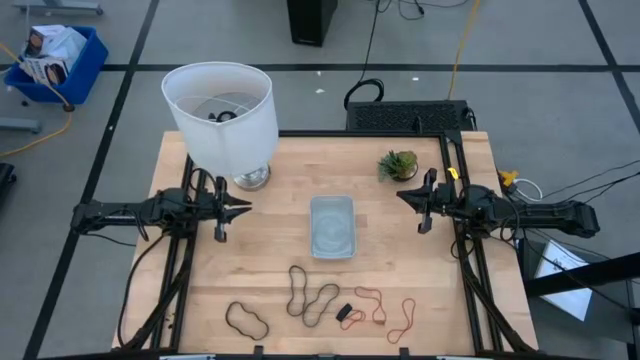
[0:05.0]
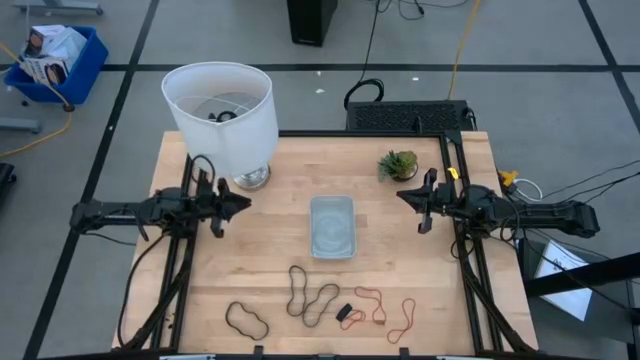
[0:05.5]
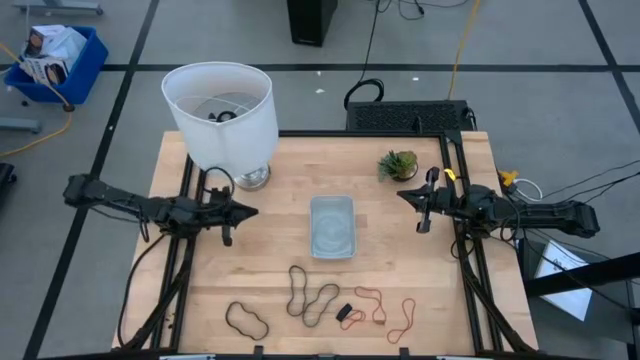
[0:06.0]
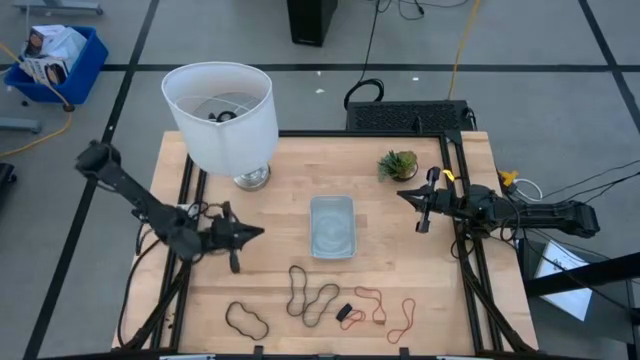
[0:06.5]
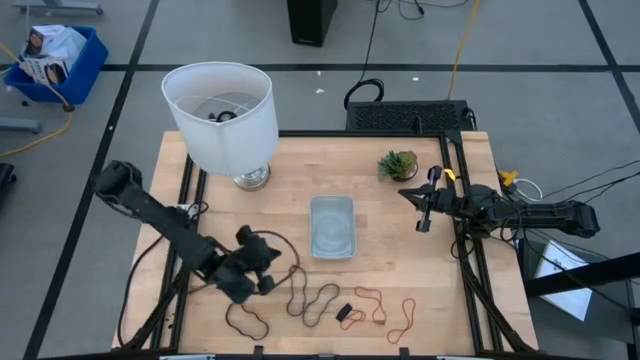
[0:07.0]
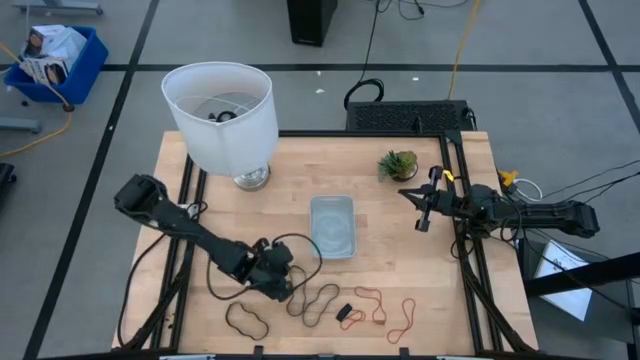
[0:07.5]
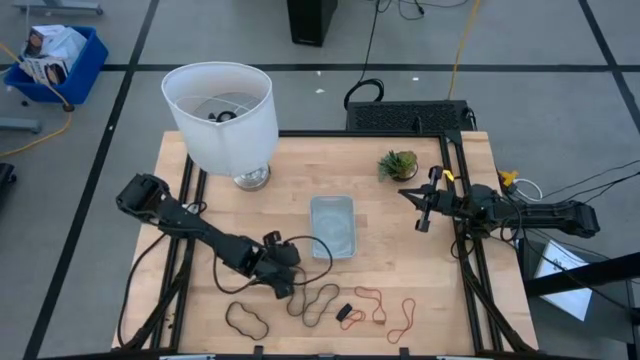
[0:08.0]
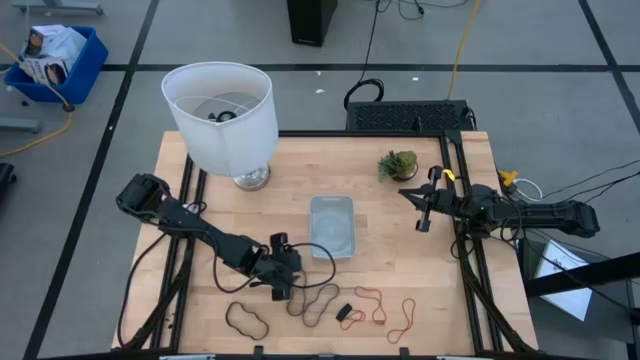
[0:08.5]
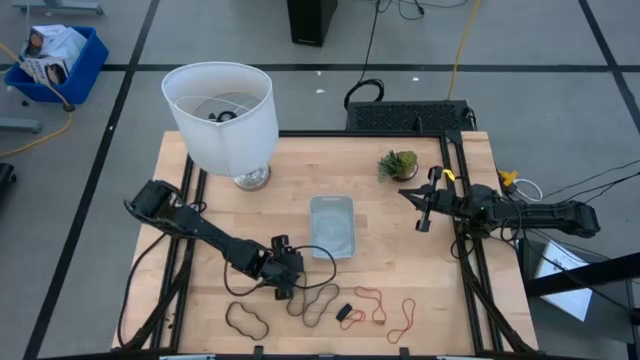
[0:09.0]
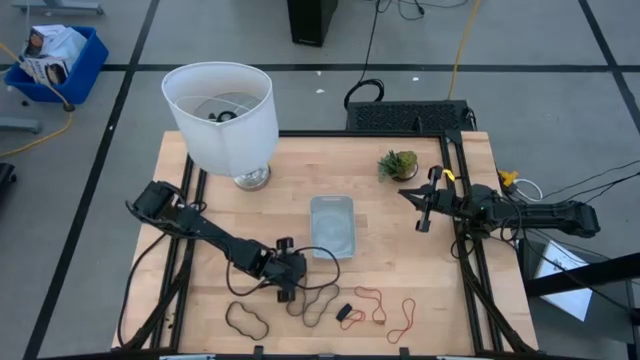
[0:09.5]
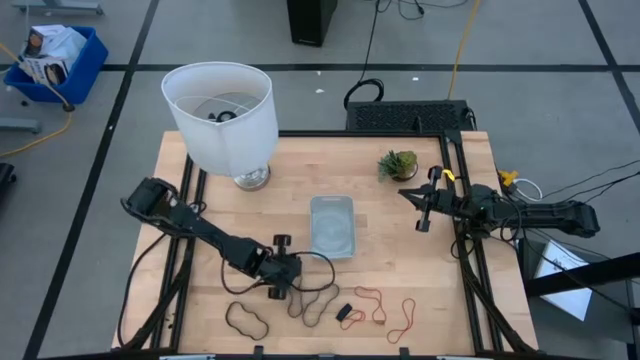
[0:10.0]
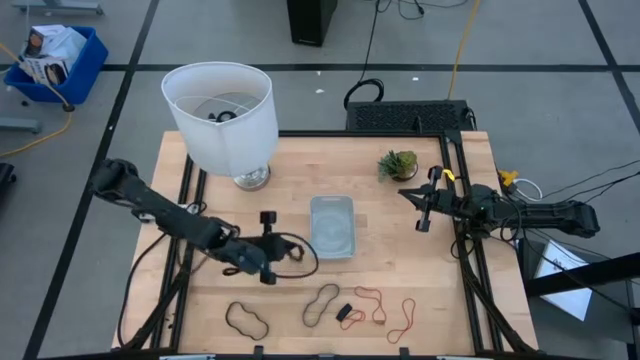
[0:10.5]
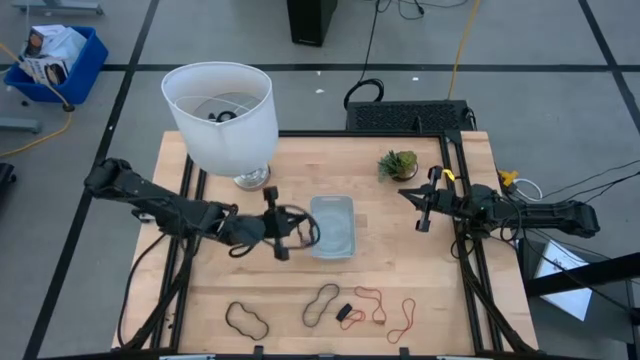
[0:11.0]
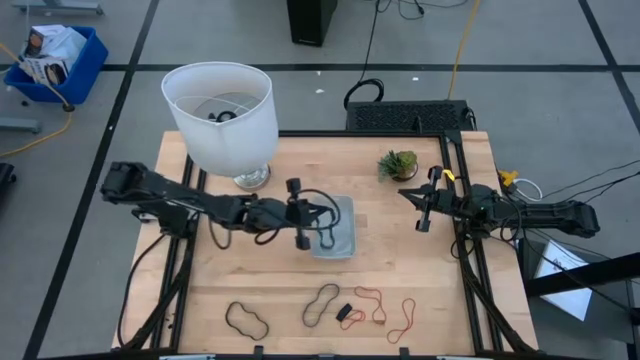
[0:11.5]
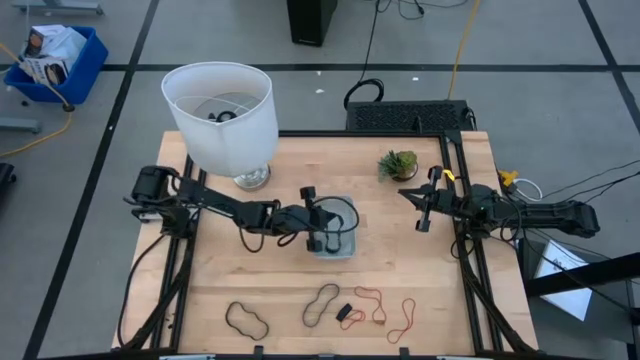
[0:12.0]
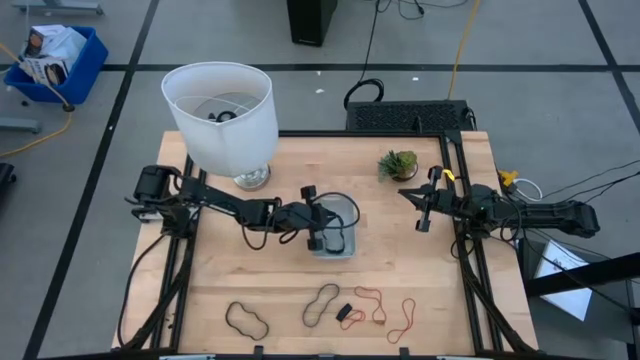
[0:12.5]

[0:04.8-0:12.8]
Task: Pick and place rubber bands into bin
Put the black rubber band into the gray bin

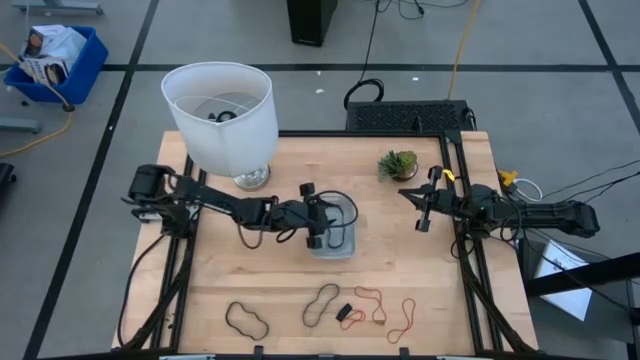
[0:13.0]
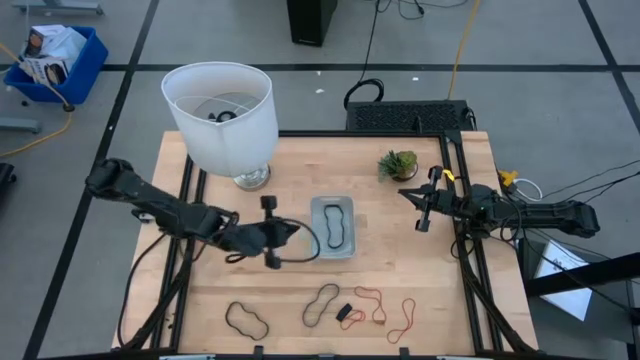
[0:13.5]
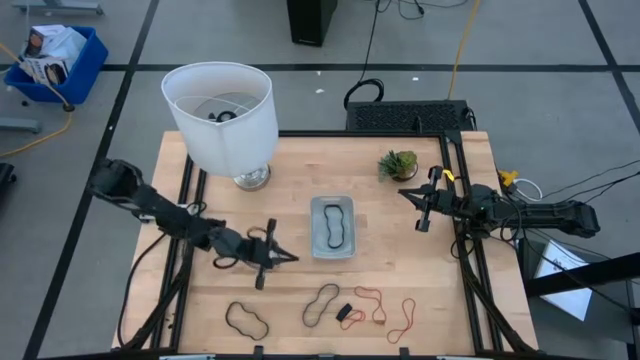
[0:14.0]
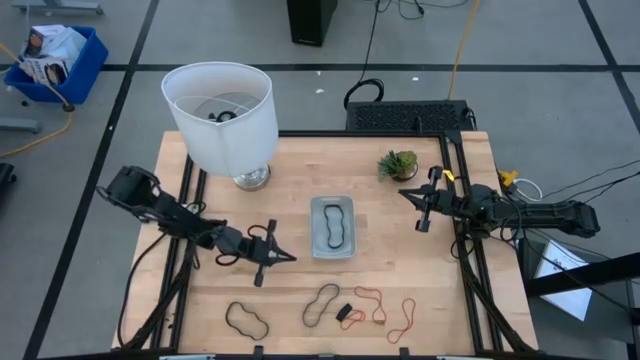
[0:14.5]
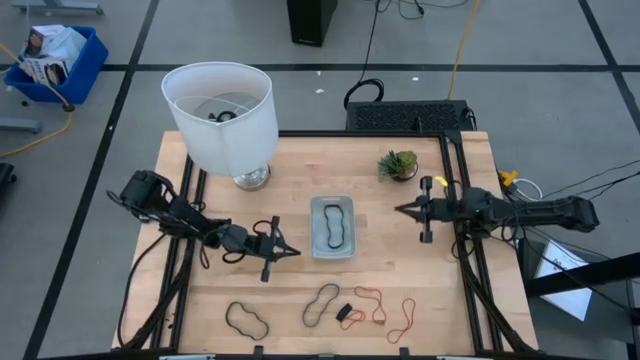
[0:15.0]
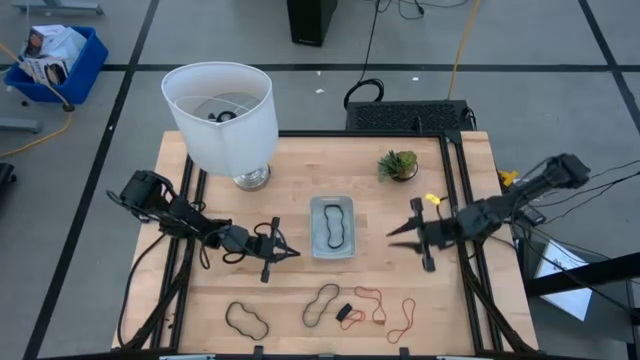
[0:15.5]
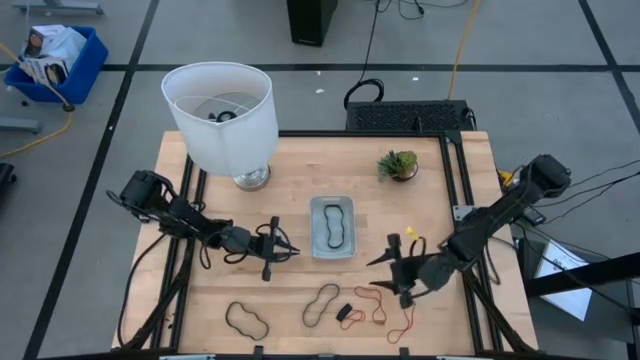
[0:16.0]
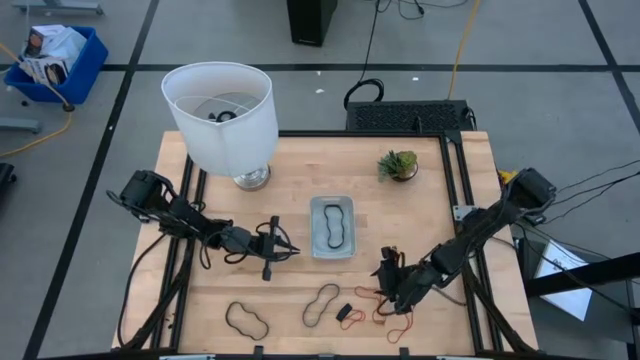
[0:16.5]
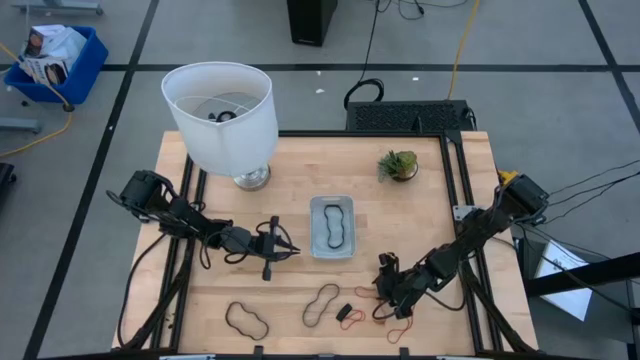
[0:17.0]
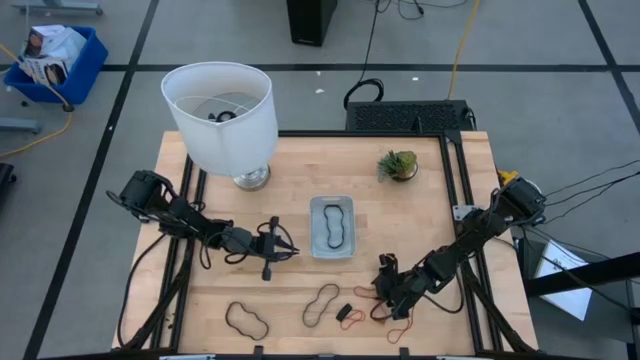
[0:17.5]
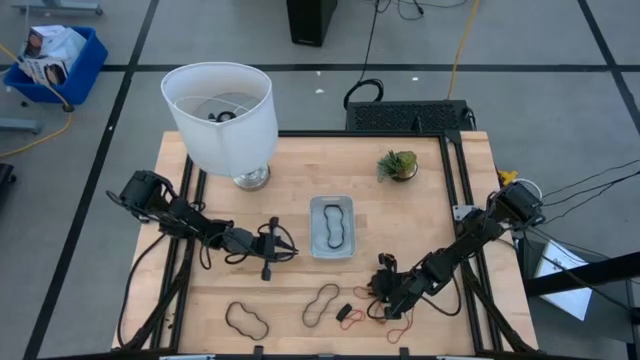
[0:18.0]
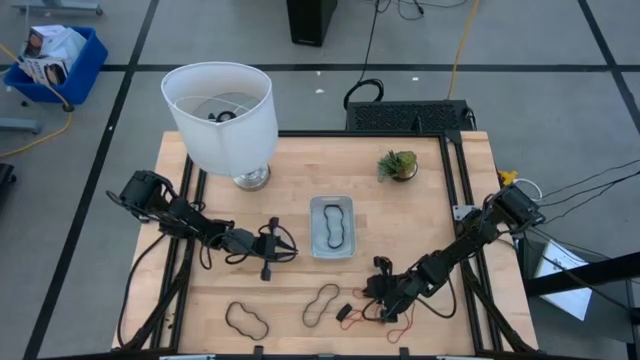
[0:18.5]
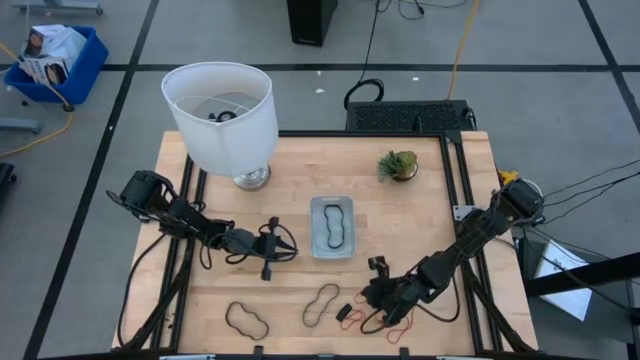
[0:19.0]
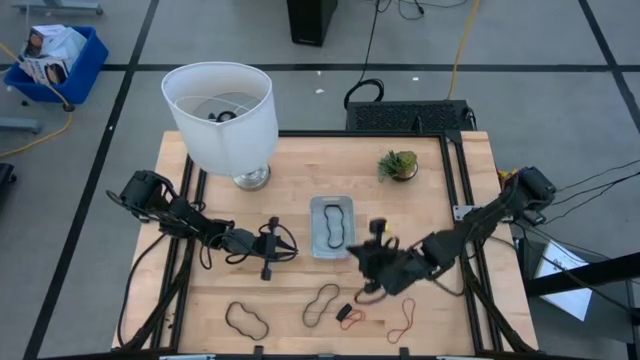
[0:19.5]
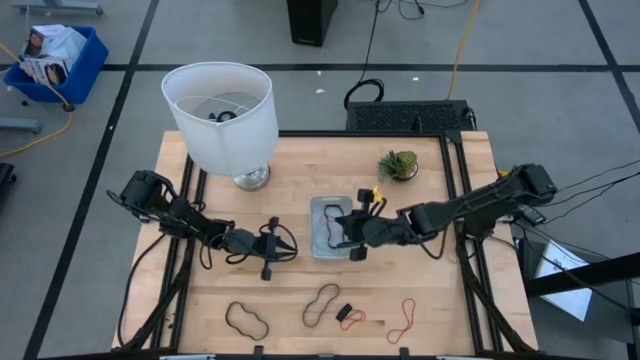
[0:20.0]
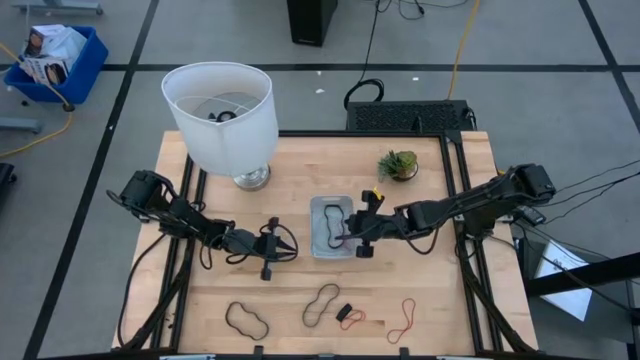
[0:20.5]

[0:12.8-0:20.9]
Put the red rubber band into the gray bin

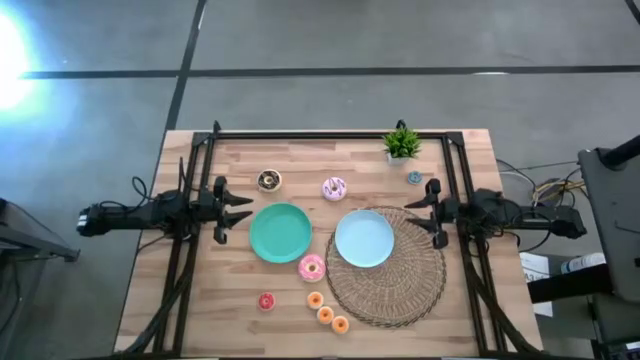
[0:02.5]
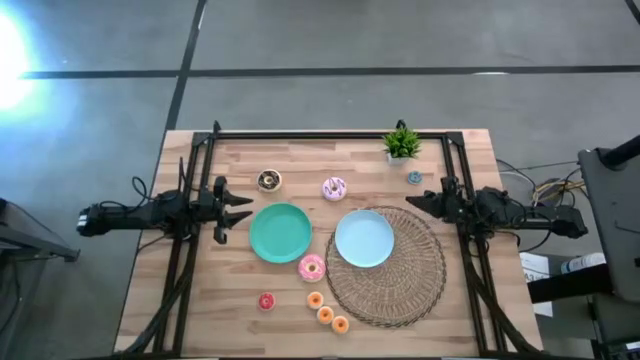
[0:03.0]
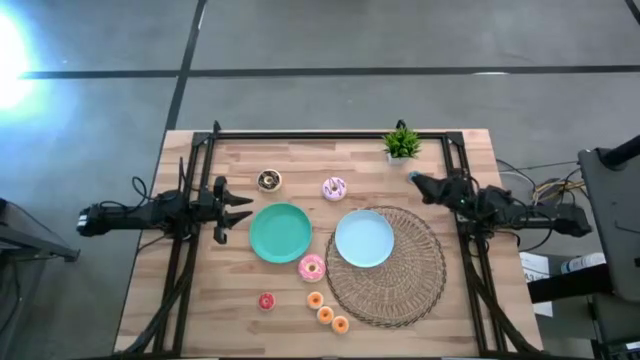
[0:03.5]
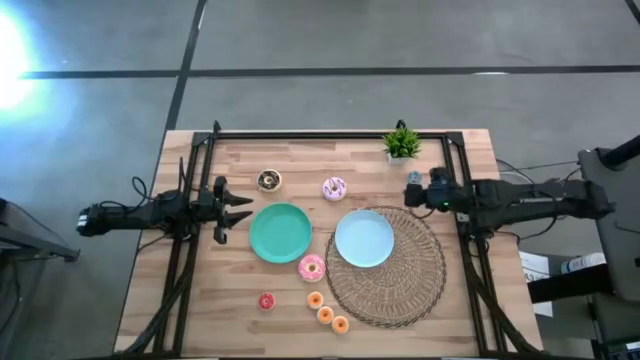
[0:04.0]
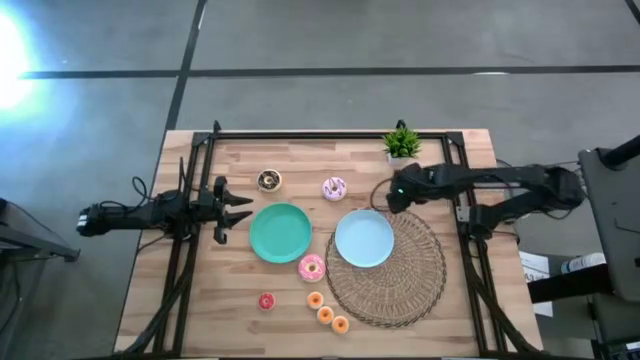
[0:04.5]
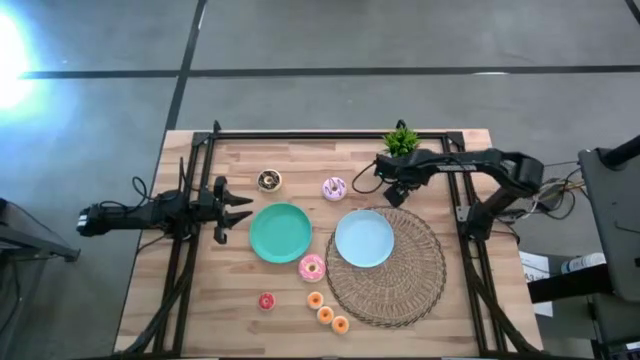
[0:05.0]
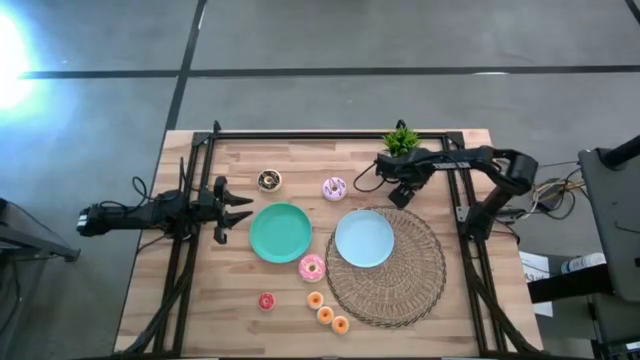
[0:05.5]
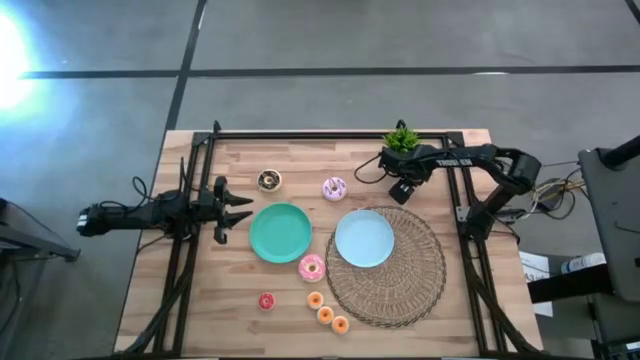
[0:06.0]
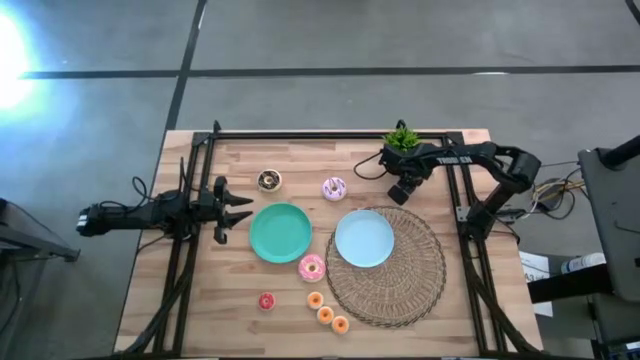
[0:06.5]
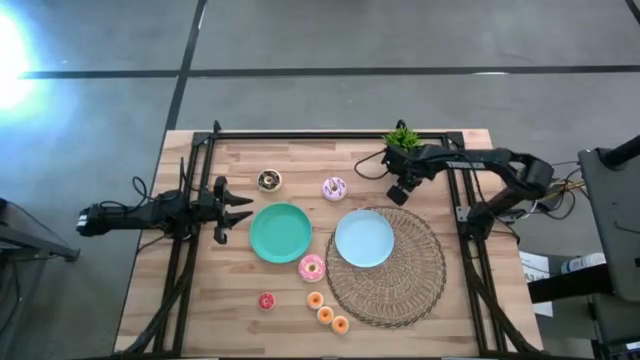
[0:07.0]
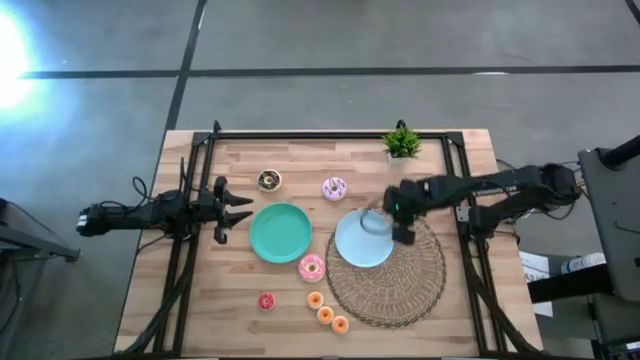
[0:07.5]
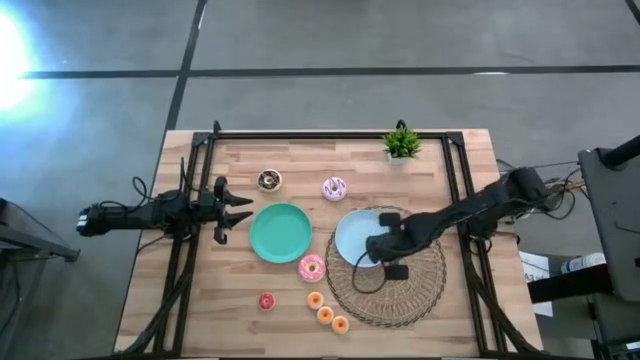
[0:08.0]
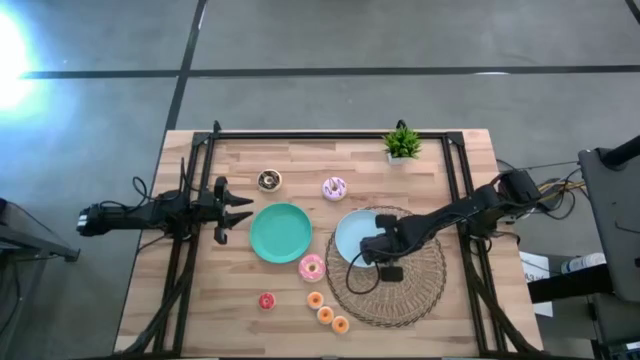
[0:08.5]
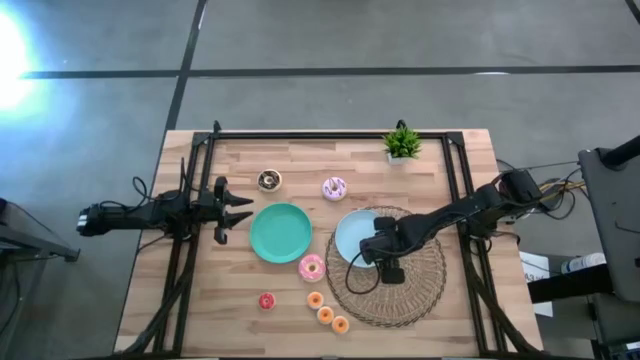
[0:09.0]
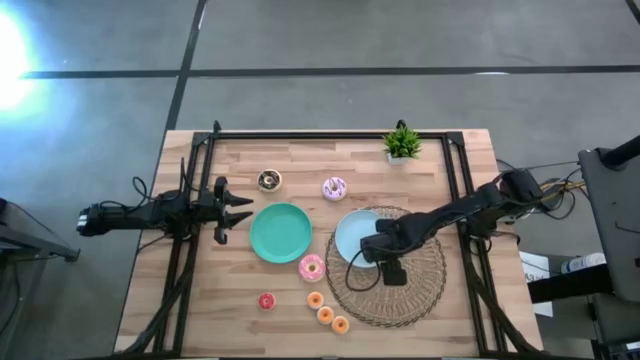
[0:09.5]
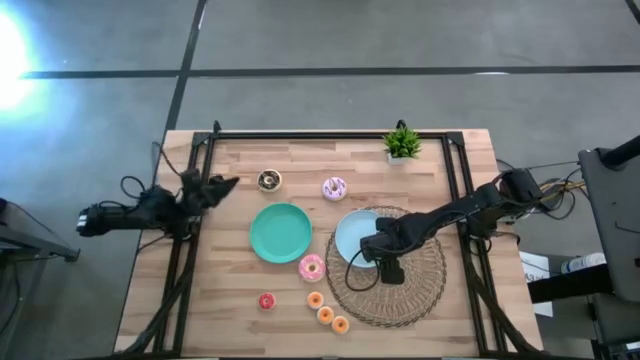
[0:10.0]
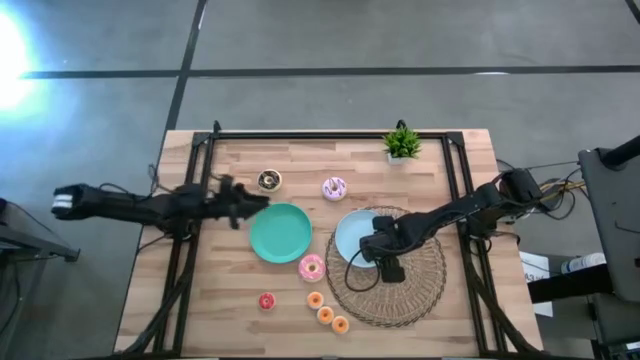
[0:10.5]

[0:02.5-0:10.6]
Task: Pick & Place donuts
Put the small blue donut on the blue plate
